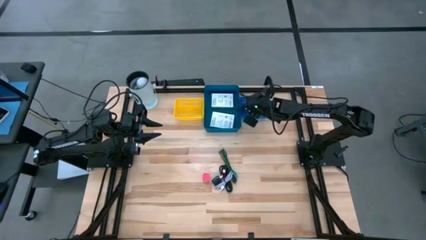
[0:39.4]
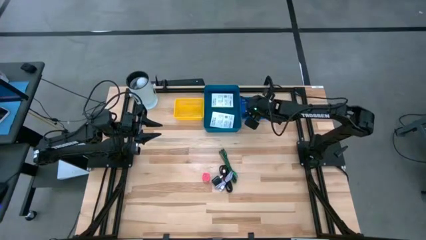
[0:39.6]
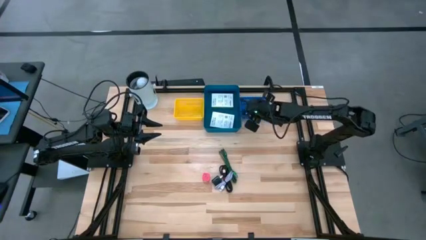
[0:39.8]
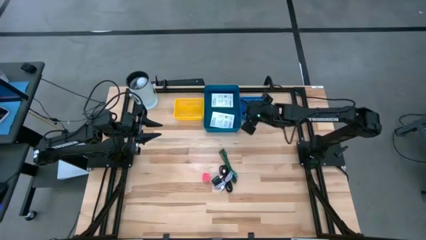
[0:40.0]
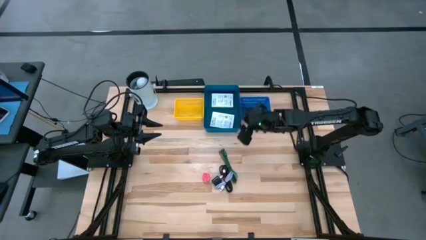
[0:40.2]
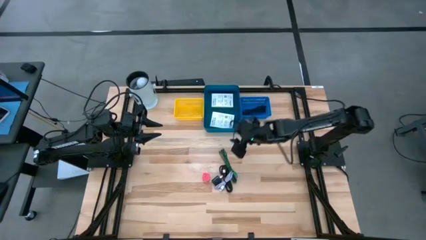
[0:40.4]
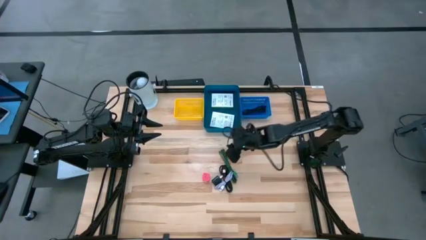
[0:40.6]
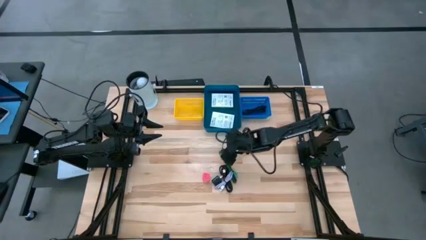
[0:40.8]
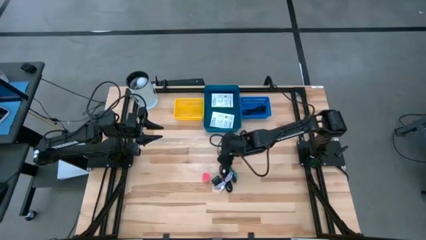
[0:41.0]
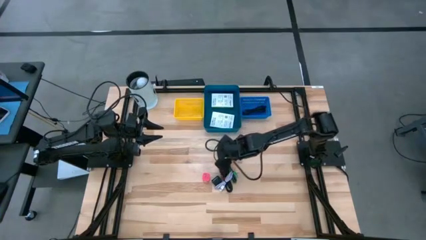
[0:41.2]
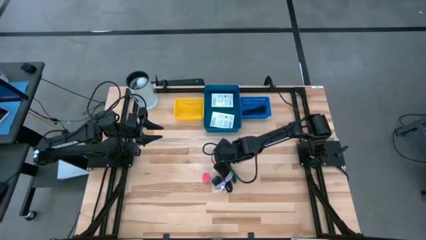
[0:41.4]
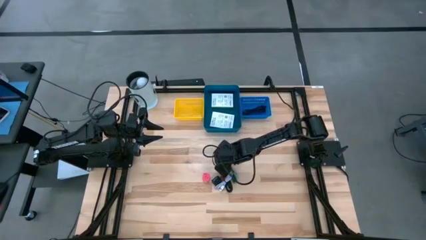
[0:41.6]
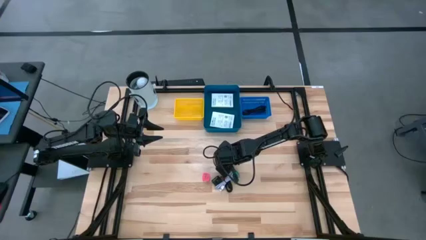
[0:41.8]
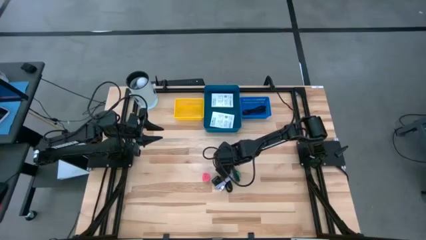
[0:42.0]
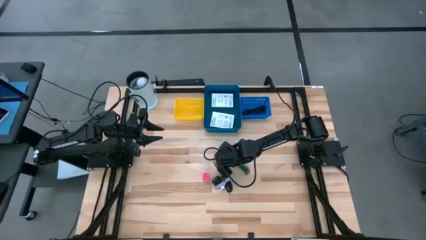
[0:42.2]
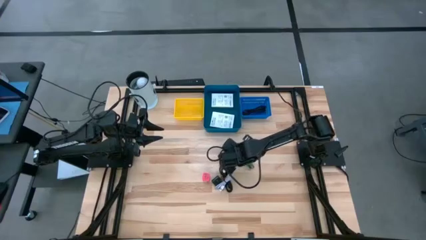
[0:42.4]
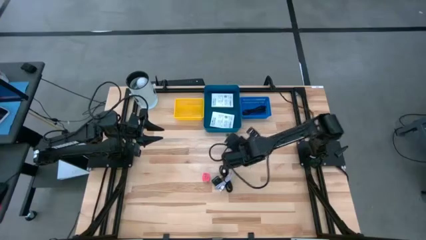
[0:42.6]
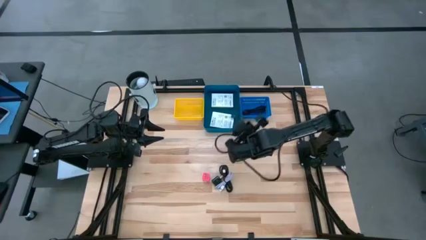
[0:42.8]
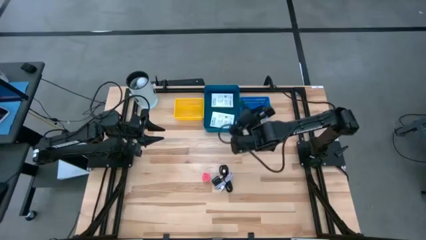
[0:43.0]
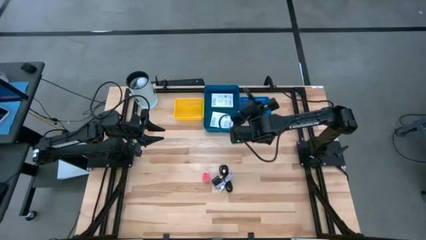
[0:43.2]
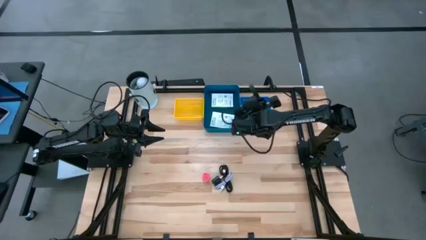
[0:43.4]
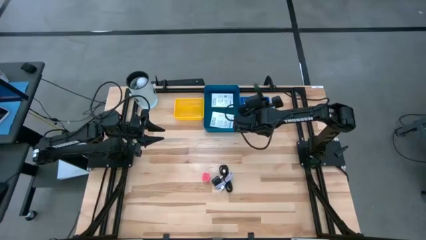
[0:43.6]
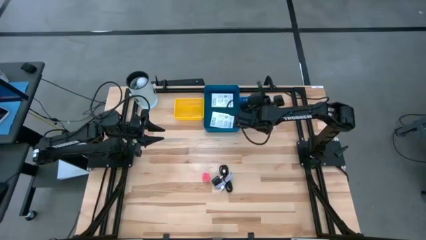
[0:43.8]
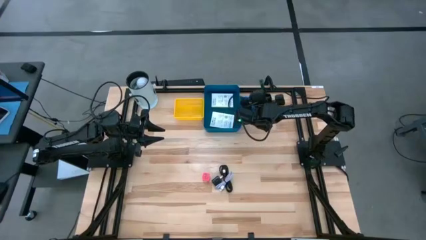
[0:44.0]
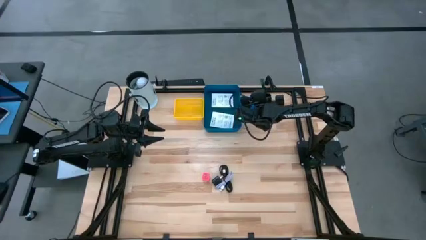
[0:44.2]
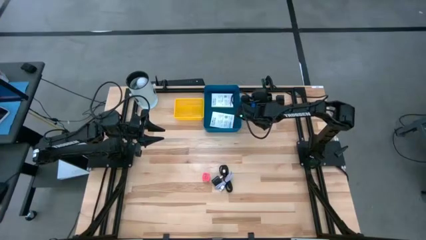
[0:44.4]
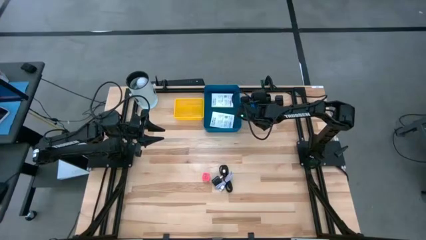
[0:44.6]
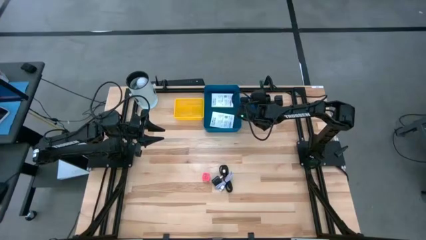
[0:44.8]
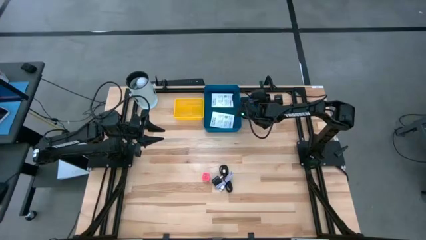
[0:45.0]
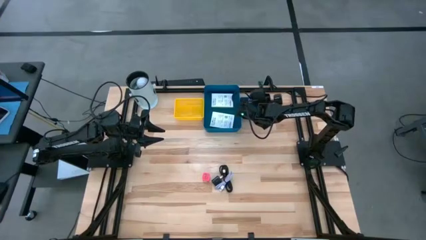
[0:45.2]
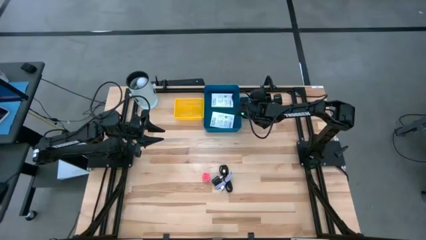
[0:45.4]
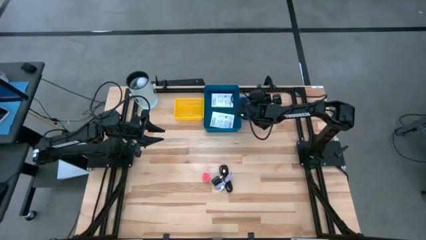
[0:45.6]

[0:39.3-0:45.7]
Task: Pick and place items into bin
Put the green charger cable into the small blue bin

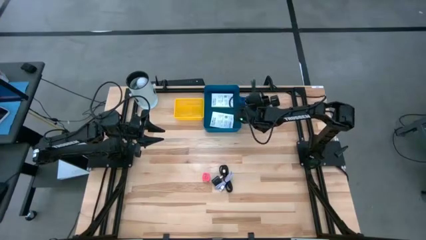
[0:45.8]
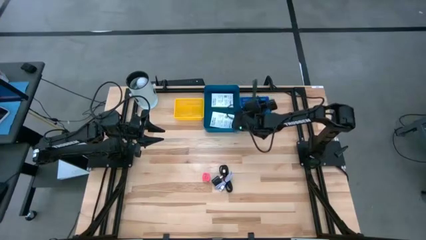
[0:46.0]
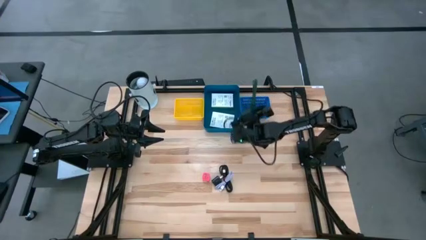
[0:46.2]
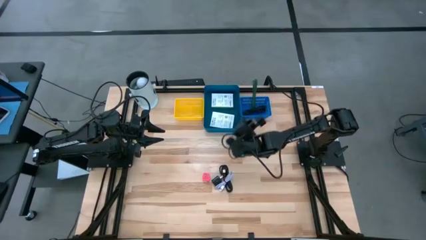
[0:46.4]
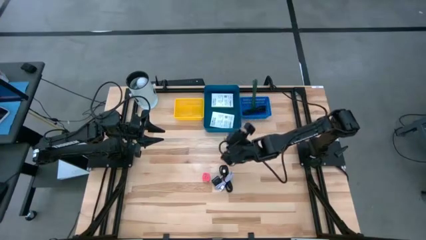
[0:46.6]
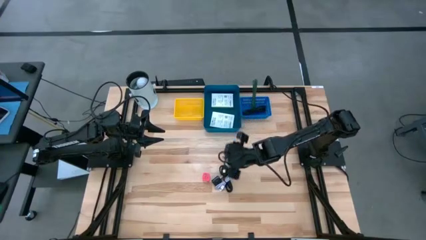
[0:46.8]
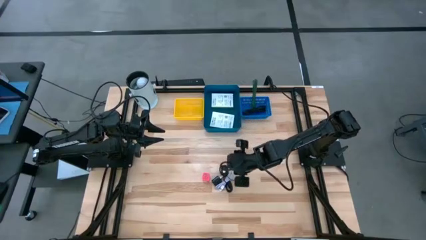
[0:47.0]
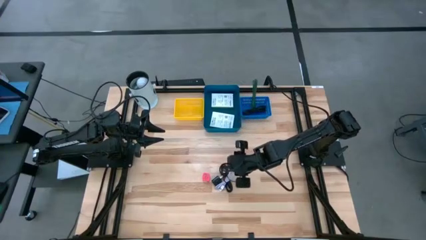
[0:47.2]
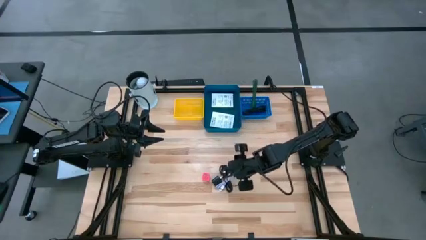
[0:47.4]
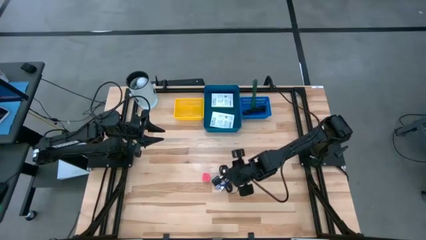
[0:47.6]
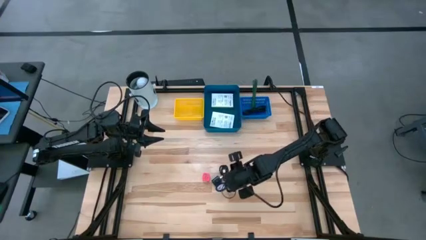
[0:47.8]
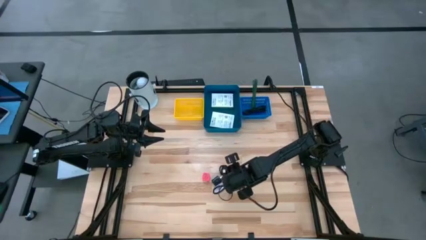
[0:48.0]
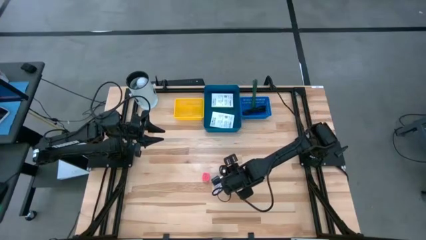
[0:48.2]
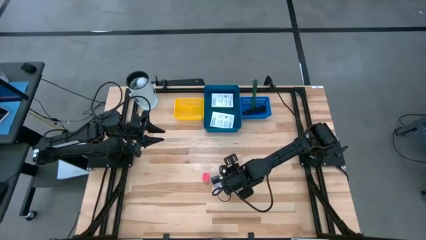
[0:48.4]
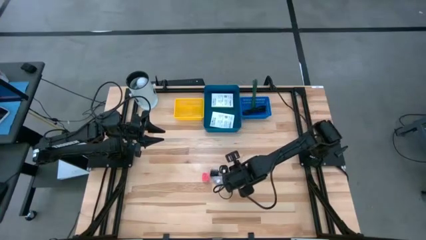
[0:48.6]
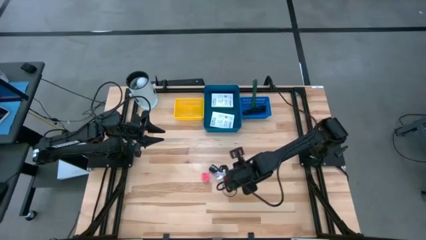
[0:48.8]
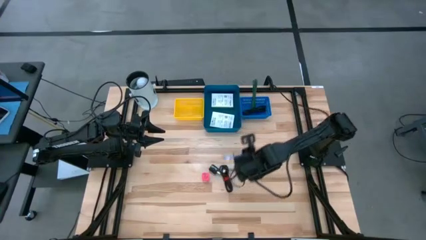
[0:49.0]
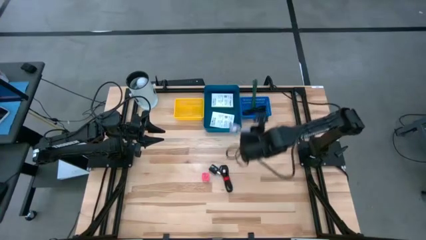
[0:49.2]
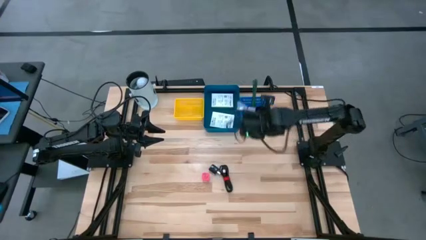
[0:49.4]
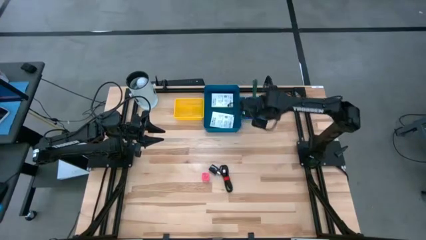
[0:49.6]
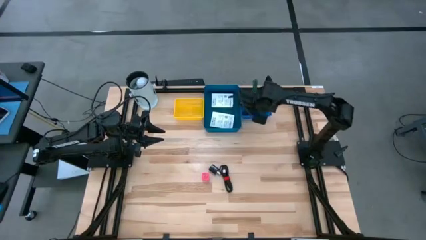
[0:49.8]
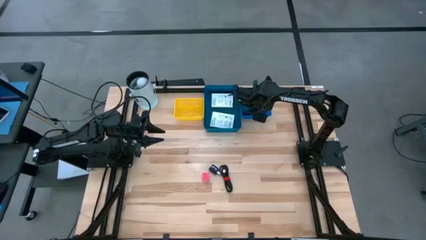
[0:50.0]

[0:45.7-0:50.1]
Put the white charger cable into the small blue bin

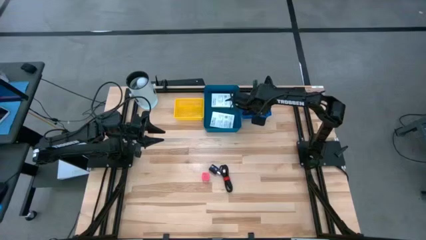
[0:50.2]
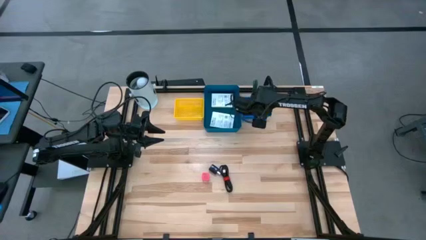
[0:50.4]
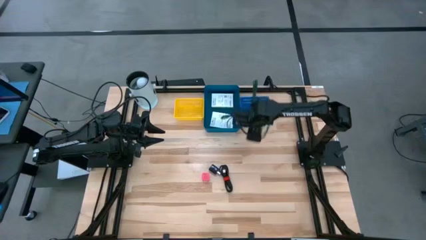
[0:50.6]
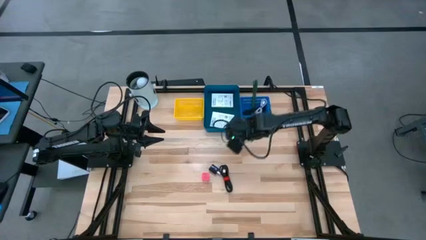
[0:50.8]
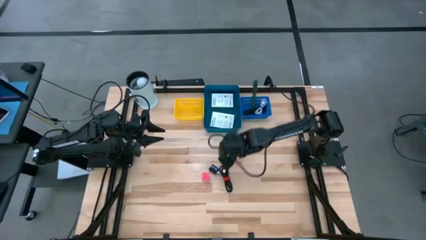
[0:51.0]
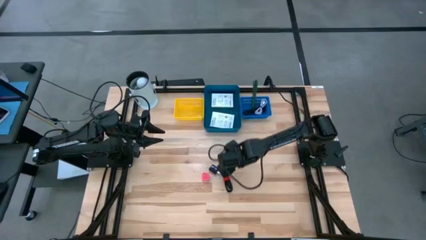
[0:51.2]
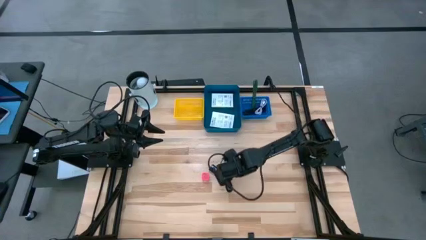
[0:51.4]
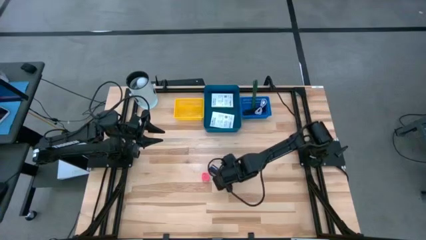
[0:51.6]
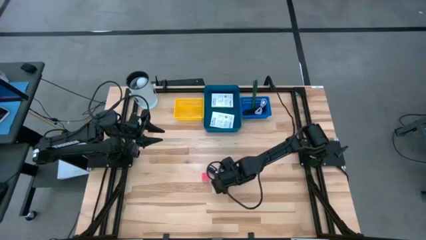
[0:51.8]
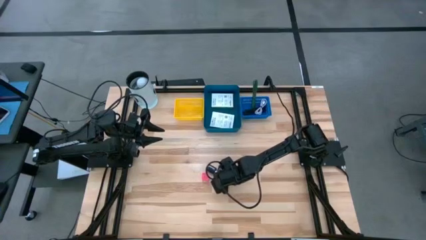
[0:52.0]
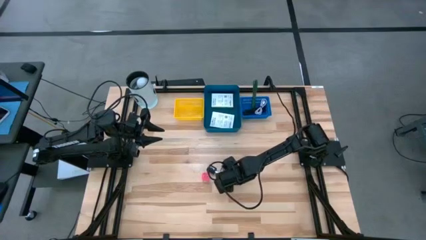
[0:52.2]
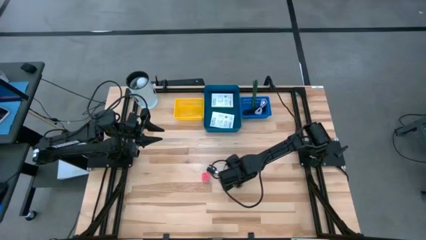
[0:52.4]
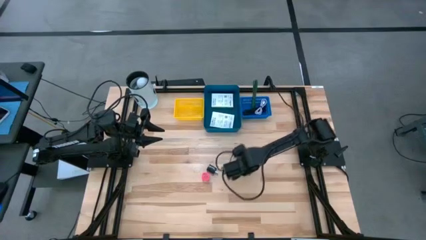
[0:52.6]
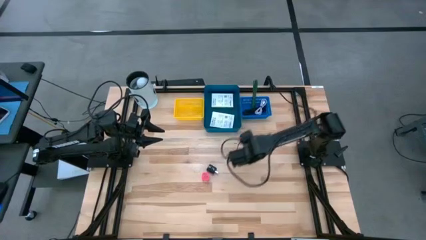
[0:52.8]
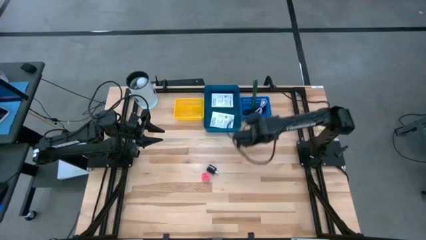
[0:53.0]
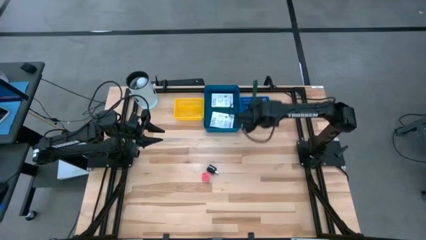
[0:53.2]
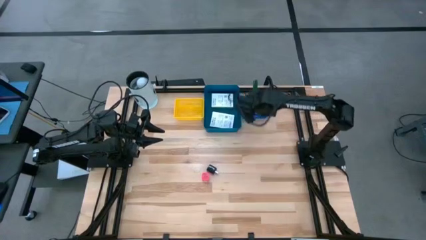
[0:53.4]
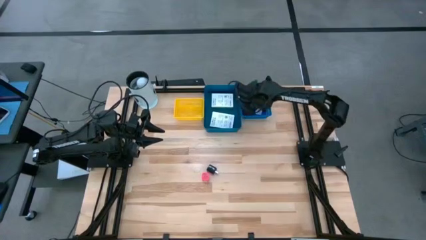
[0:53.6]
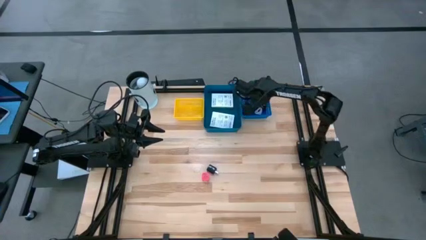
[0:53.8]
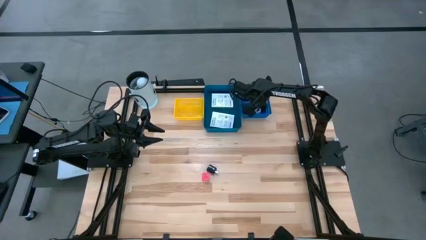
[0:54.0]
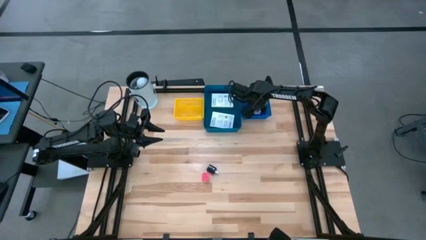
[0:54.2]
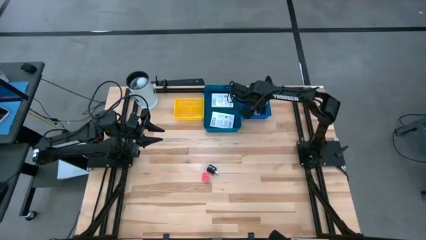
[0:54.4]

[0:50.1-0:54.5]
Put the black charger cable into the small blue bin

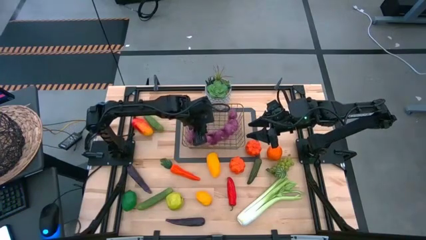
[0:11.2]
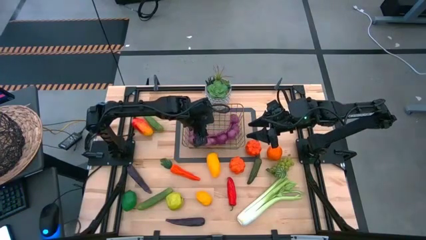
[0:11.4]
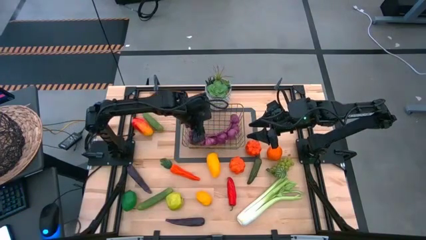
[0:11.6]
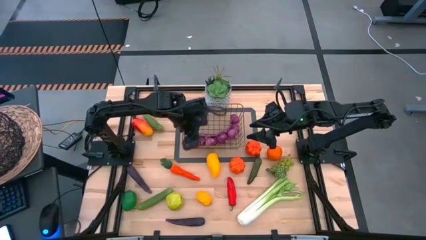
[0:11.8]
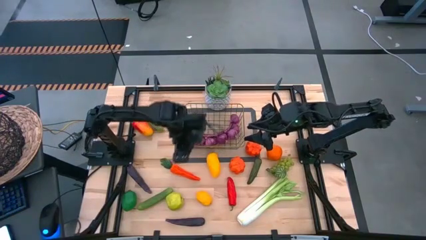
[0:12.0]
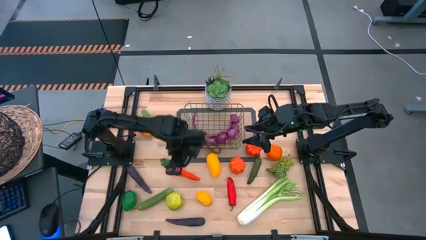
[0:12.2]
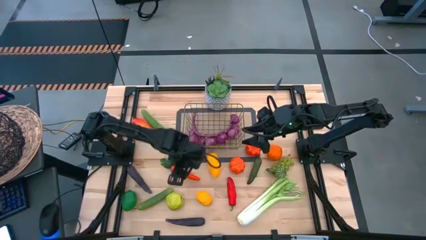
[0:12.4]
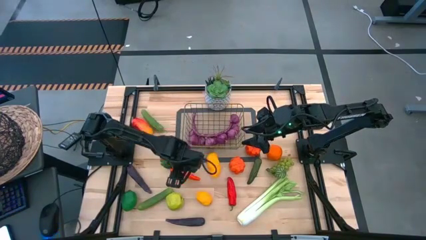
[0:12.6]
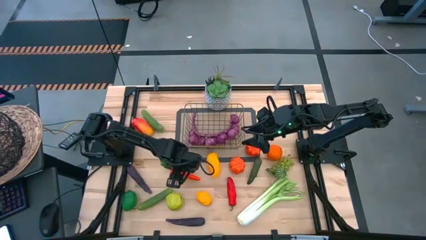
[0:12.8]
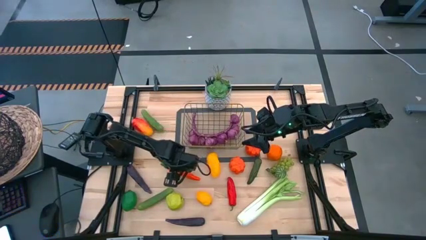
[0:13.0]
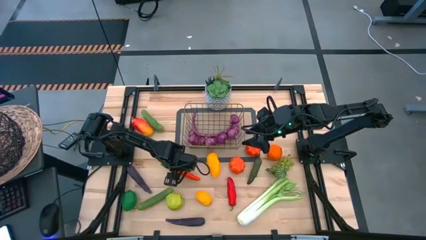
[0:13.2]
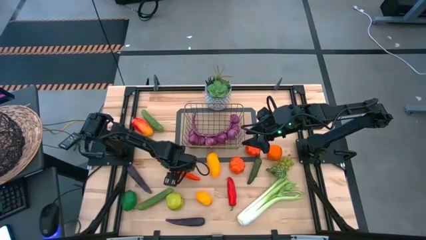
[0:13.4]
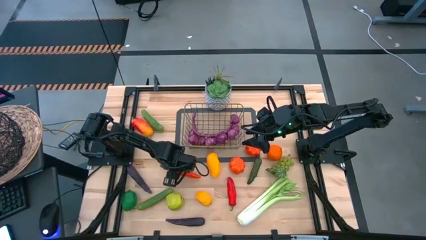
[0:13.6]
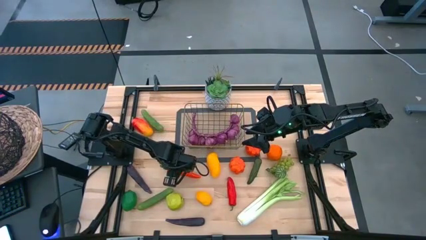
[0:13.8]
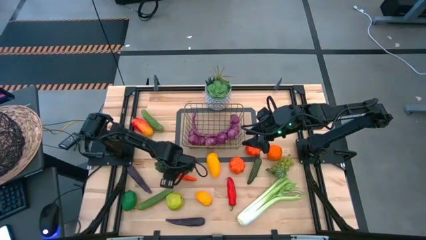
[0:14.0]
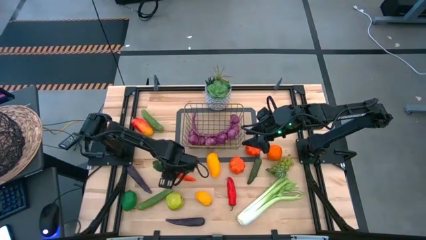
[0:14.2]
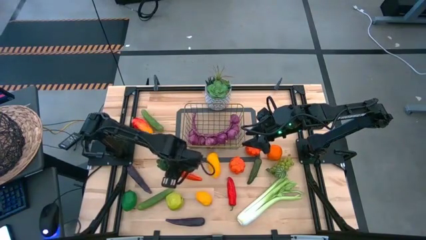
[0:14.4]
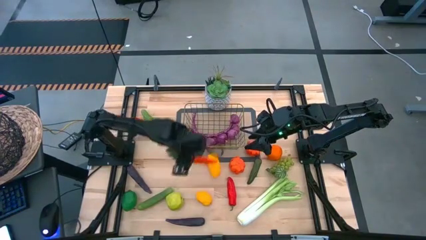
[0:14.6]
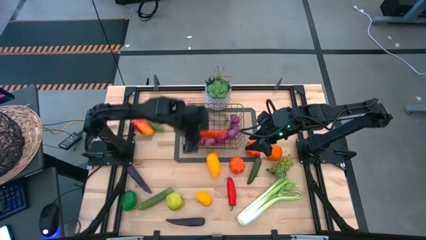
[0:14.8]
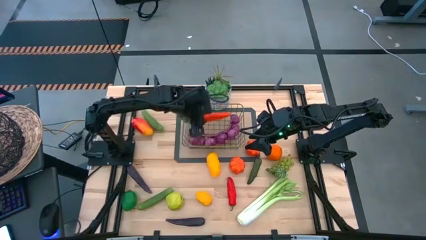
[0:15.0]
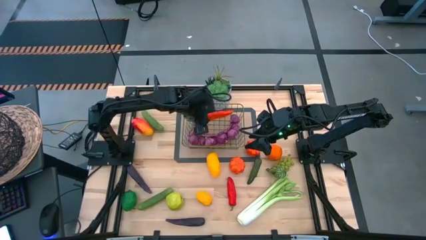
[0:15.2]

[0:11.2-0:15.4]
Task: Build produce basket
Put the carrot into the wire basket
